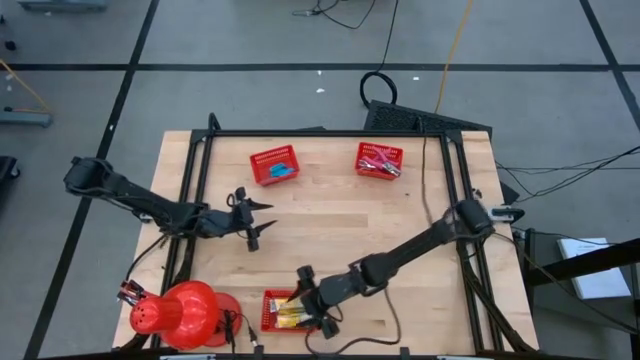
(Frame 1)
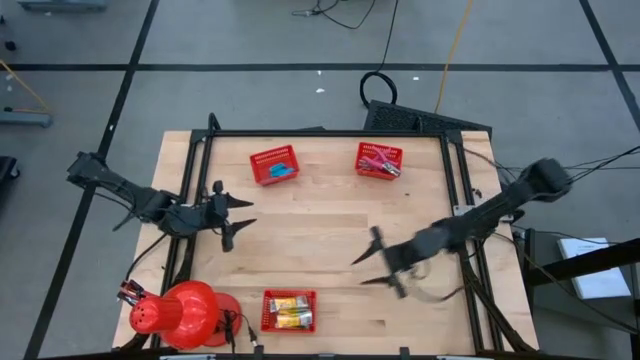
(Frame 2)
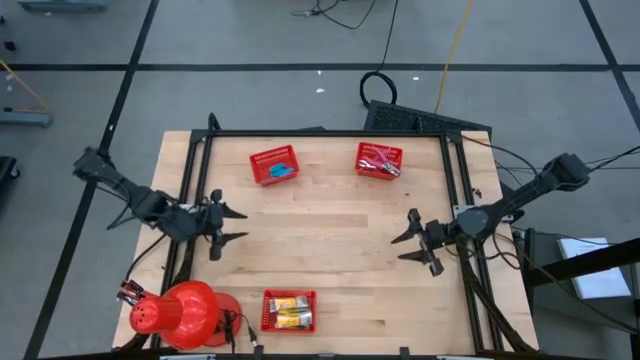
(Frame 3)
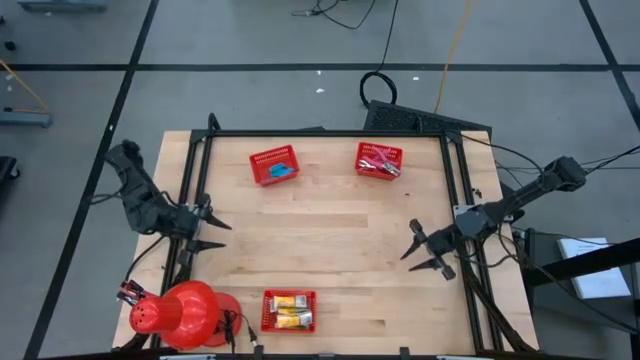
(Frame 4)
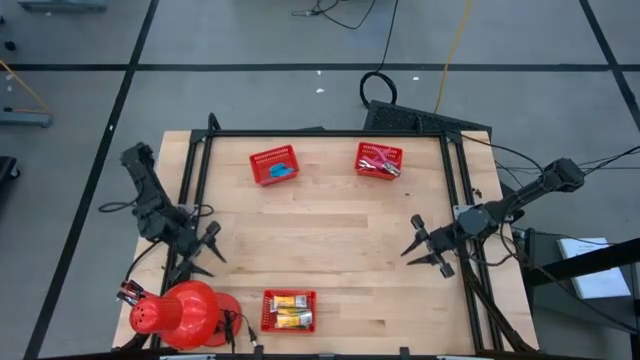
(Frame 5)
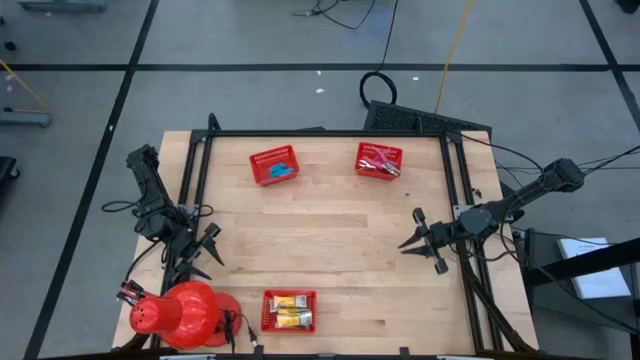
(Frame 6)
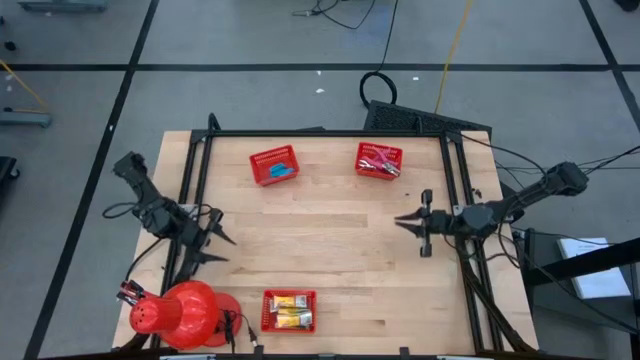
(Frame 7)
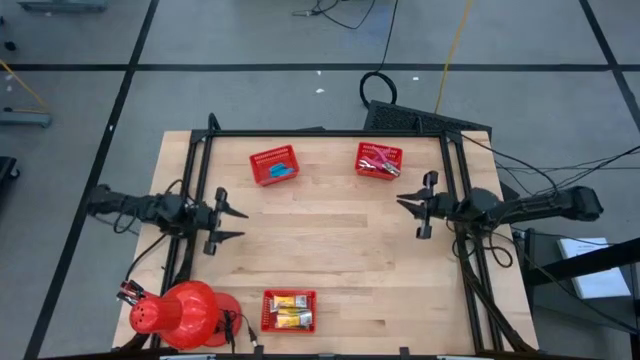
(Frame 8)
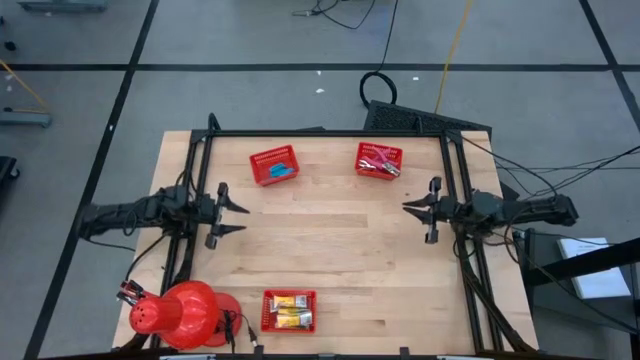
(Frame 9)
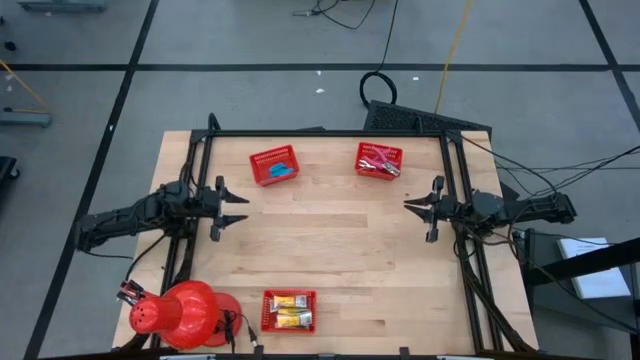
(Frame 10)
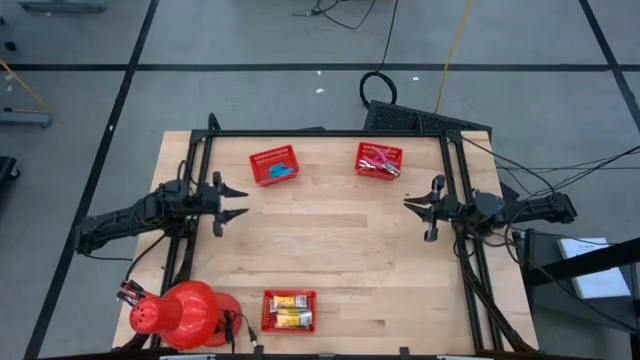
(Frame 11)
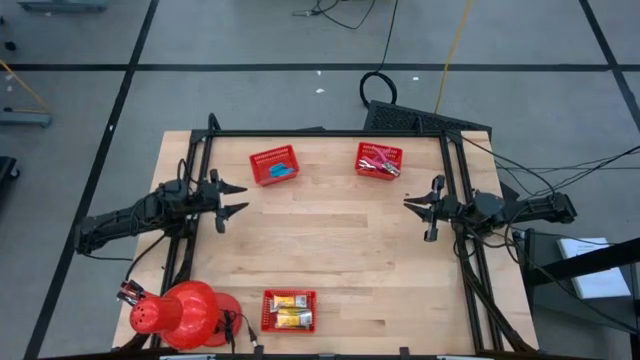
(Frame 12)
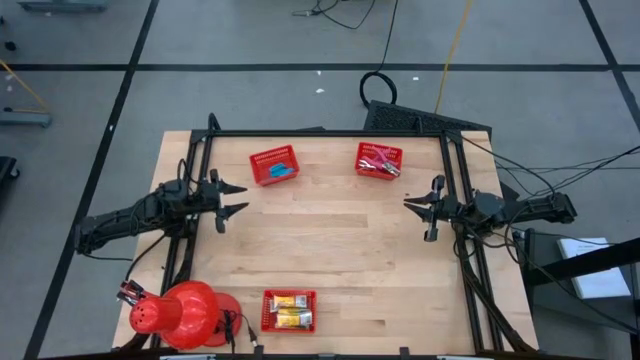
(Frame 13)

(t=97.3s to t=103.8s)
Task: Pick & Place School Supplies
Return to Home Position

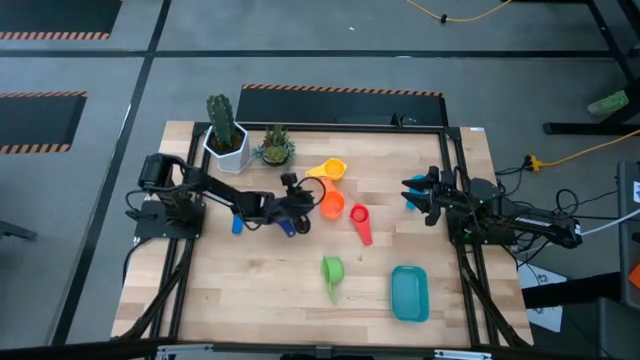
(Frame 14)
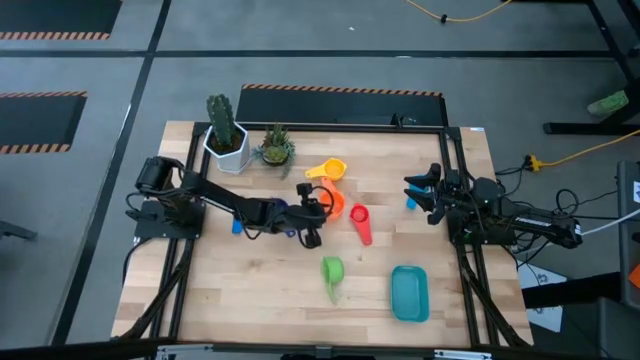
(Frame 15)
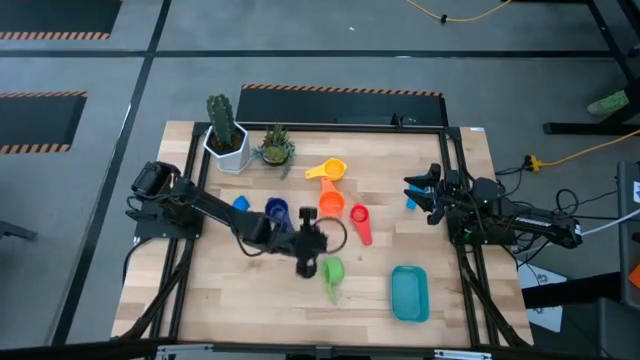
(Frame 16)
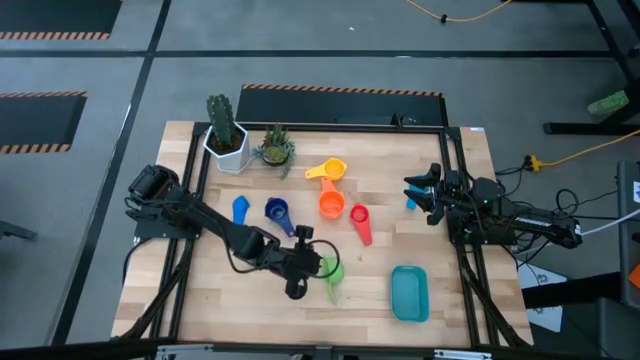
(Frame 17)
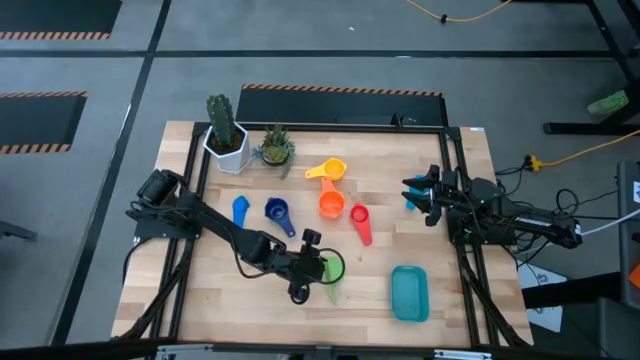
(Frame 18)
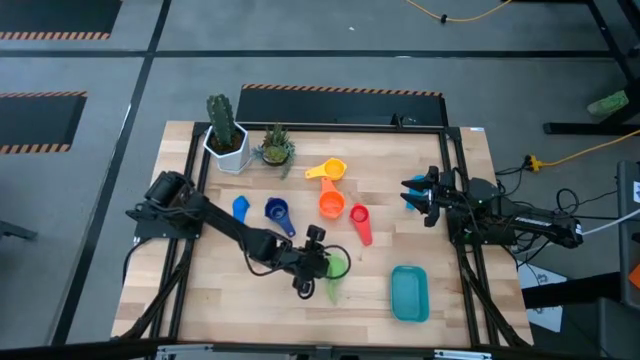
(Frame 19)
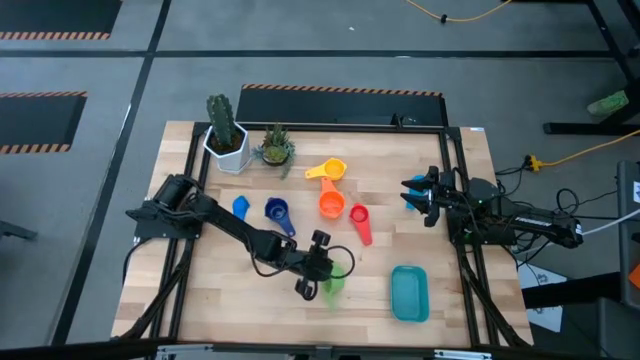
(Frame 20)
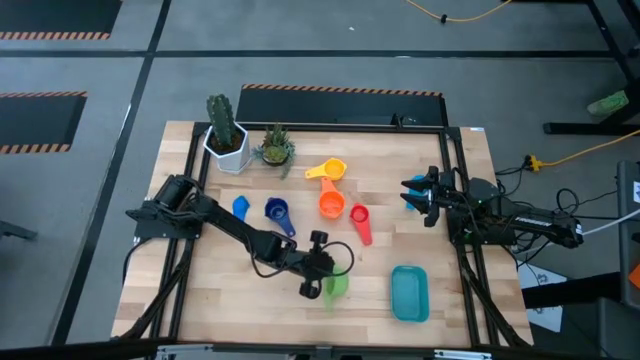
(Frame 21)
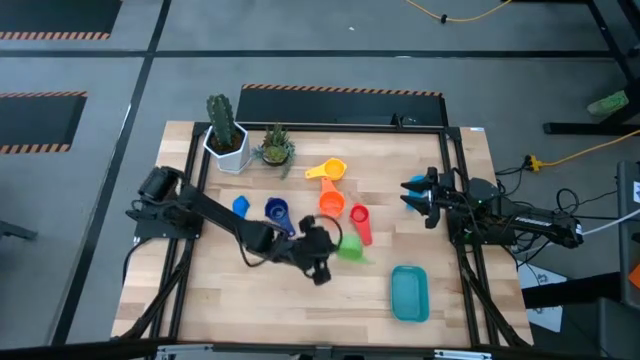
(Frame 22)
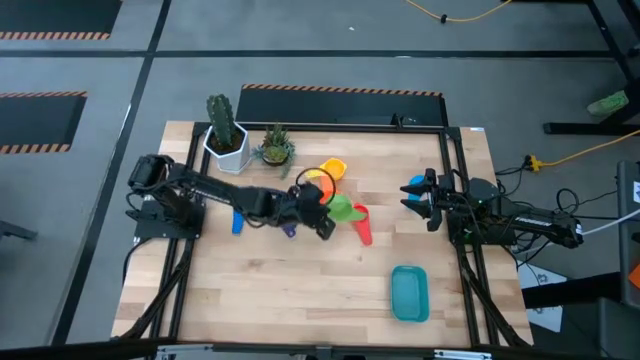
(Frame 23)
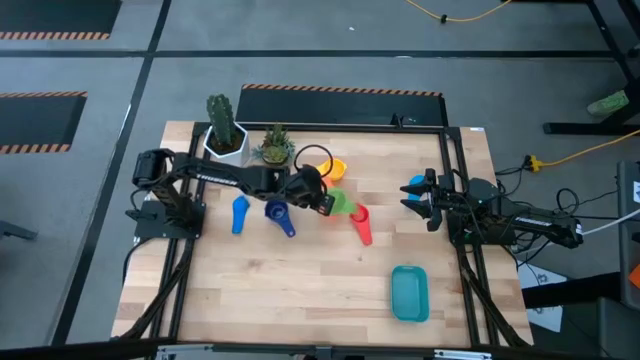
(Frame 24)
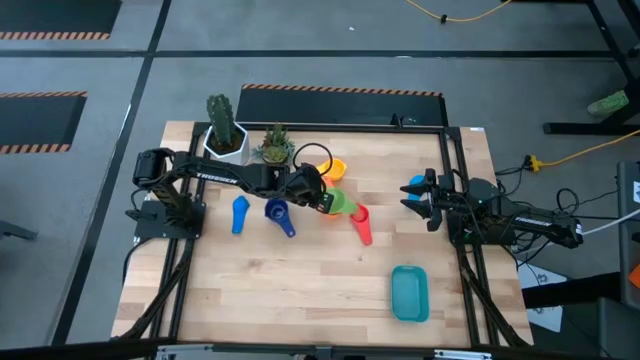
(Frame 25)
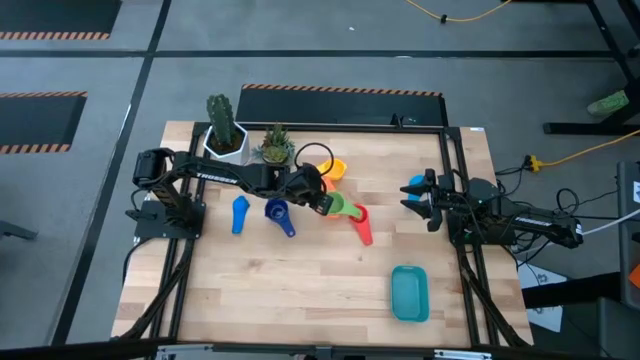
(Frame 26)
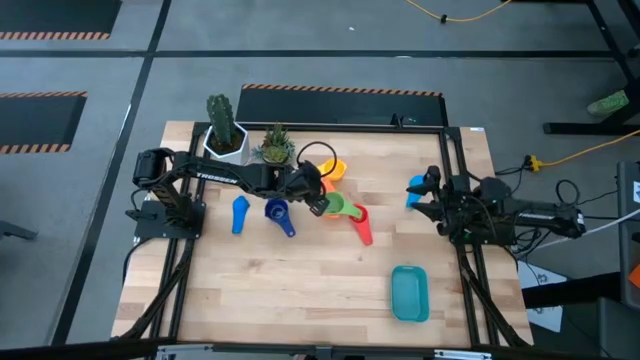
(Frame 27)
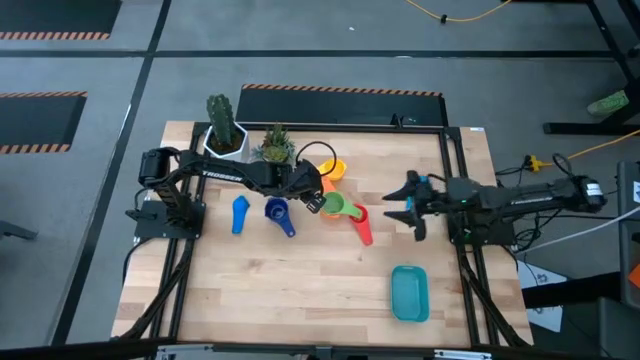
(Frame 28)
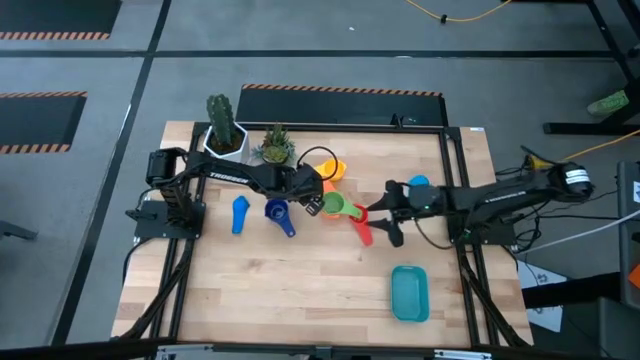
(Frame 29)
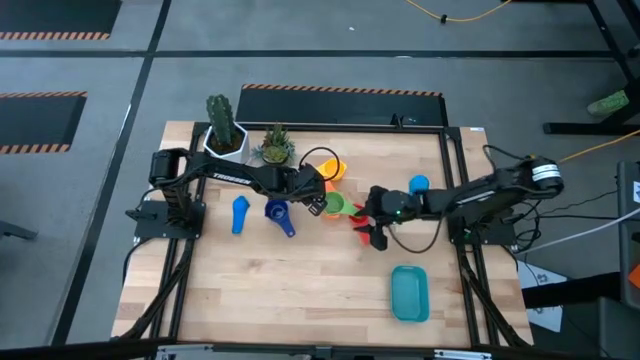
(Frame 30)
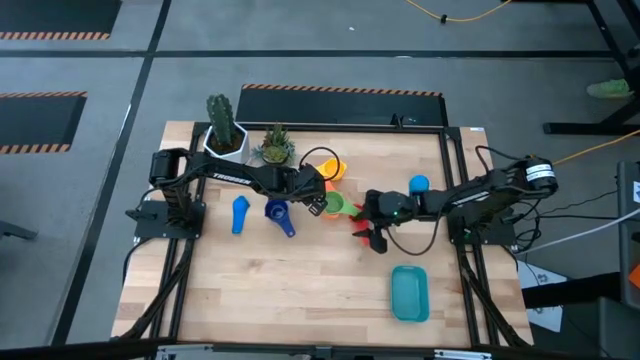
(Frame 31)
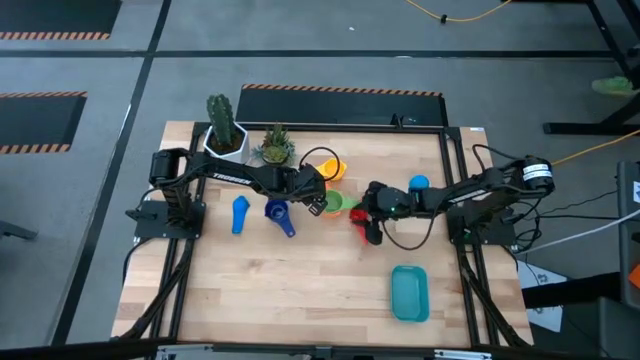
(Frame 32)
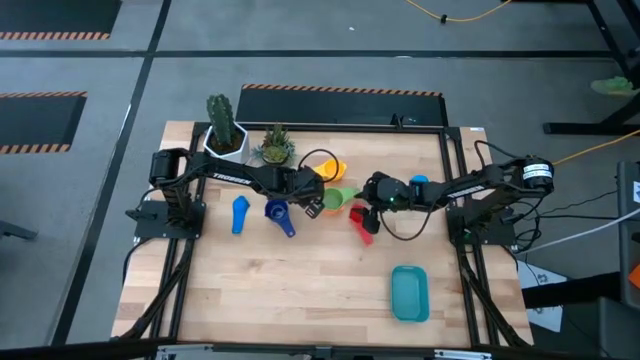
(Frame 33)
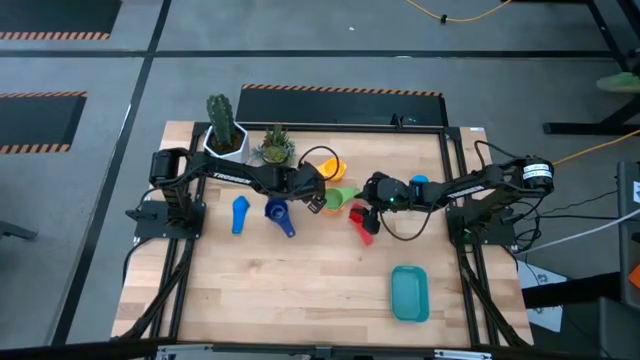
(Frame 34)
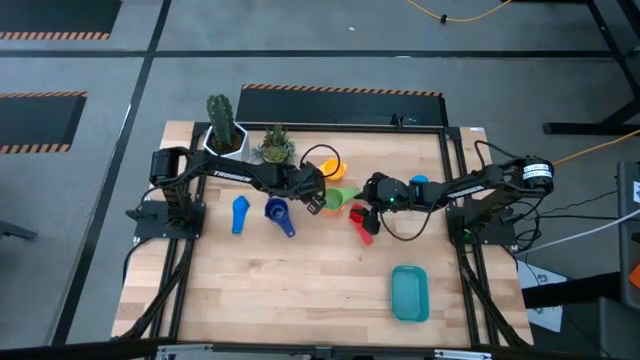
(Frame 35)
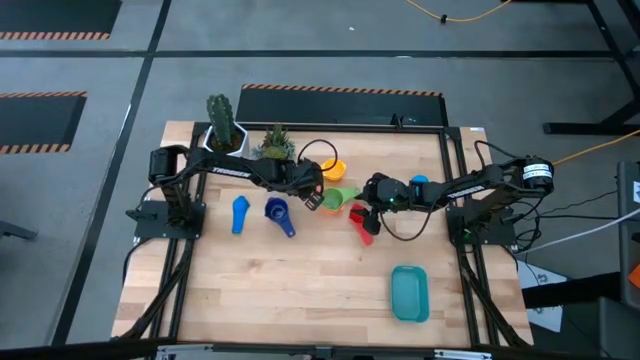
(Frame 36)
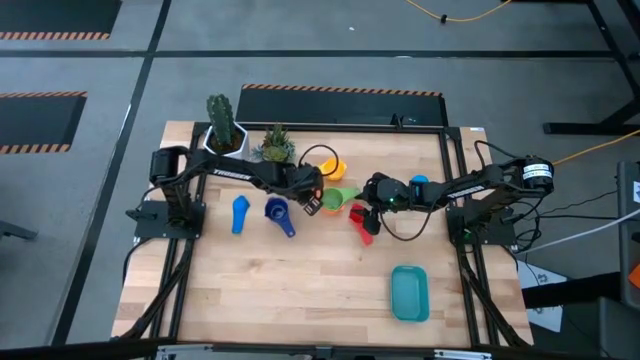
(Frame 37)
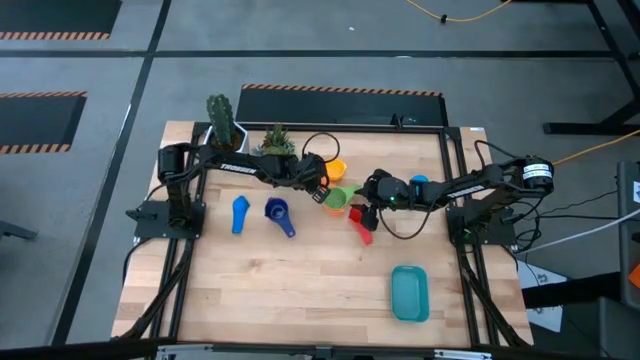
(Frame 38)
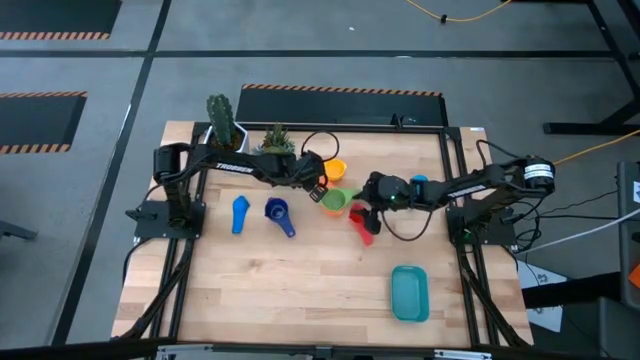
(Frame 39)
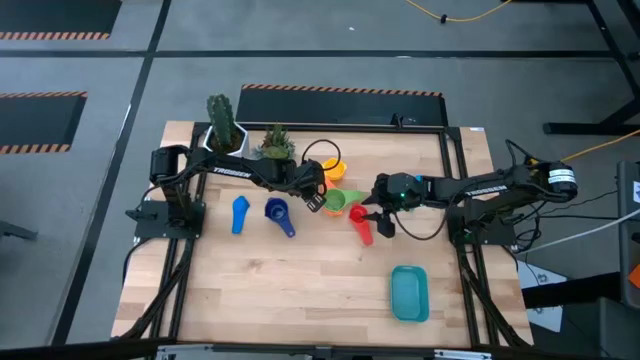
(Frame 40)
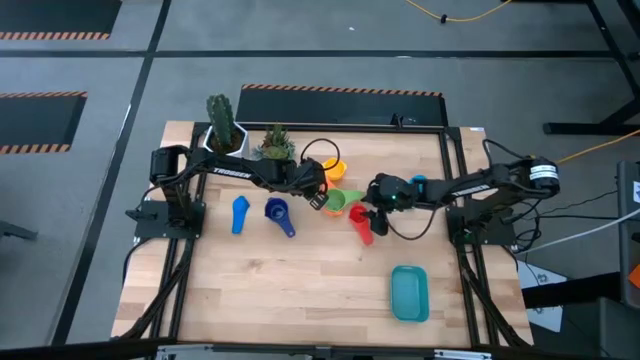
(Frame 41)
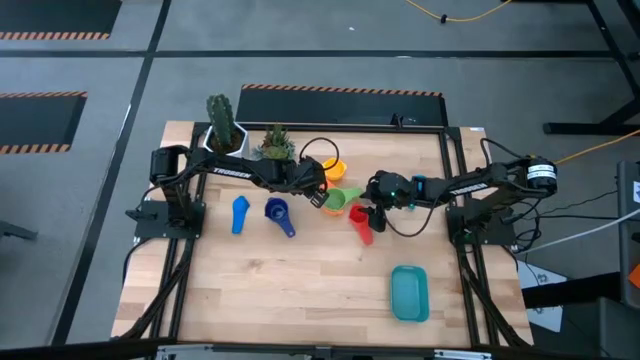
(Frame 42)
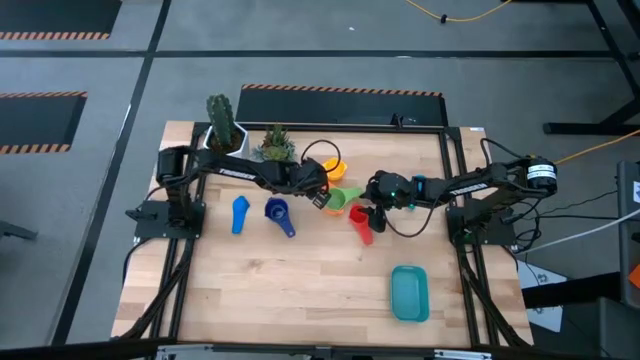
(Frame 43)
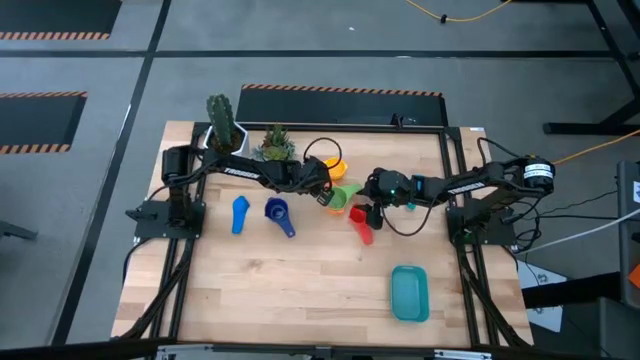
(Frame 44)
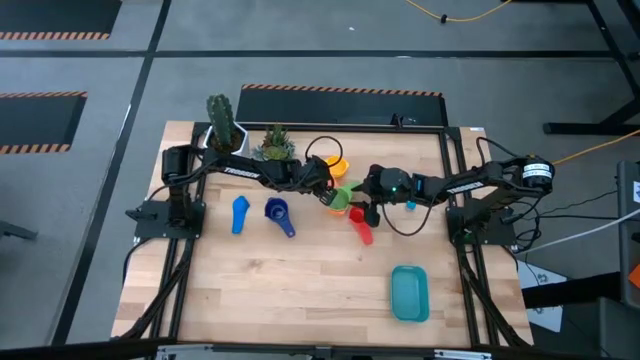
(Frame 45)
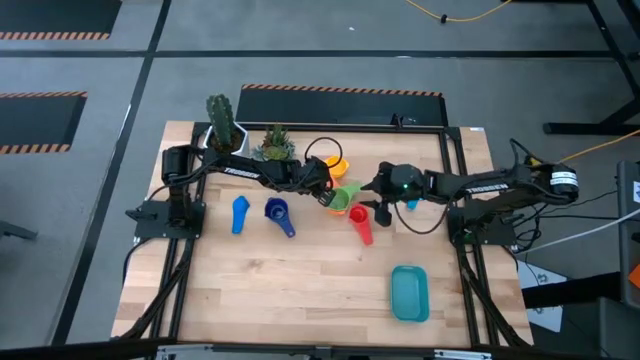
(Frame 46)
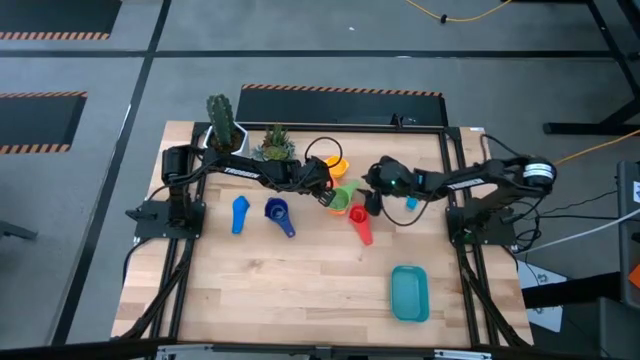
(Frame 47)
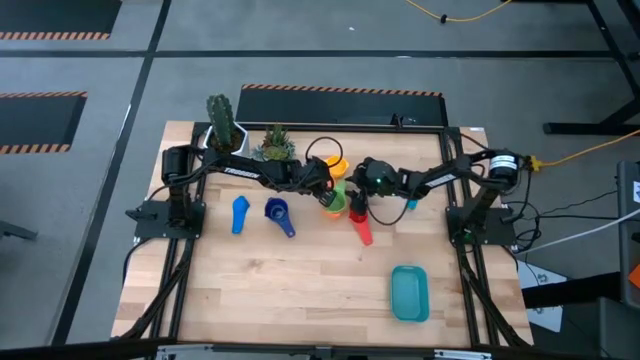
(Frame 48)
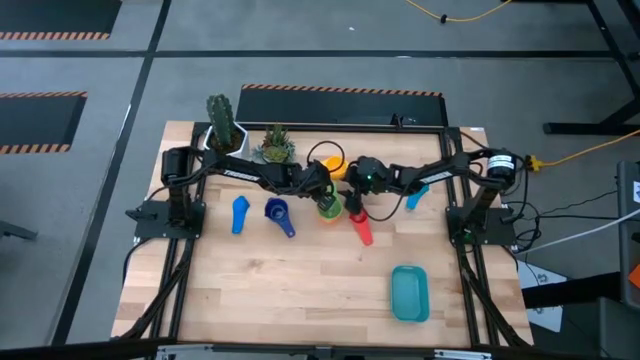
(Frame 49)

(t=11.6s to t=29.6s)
Task: Nest measuring cups in basket
Stack the green measuring cup on top of the orange measuring cup
